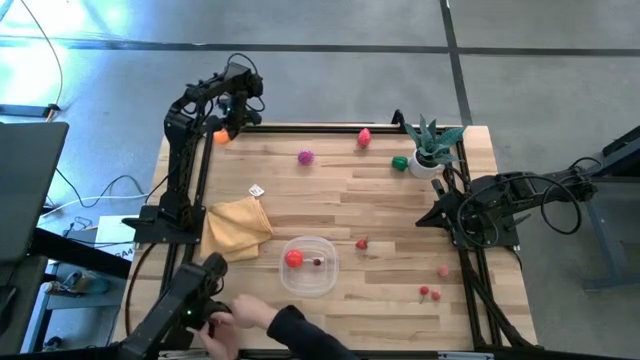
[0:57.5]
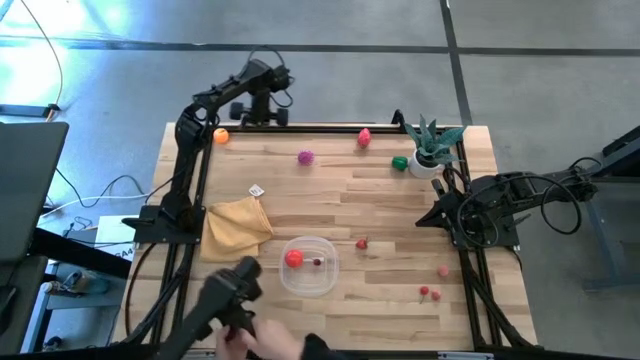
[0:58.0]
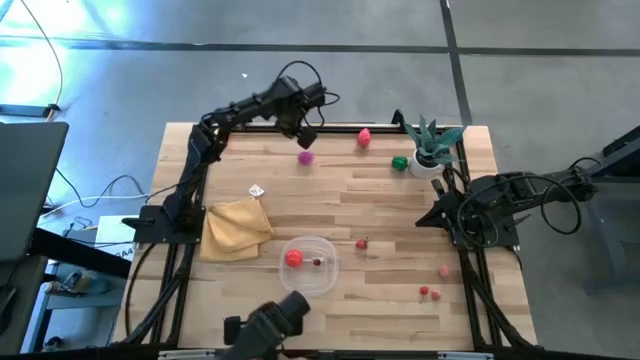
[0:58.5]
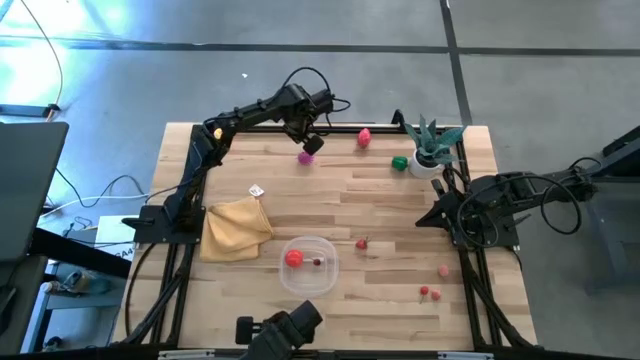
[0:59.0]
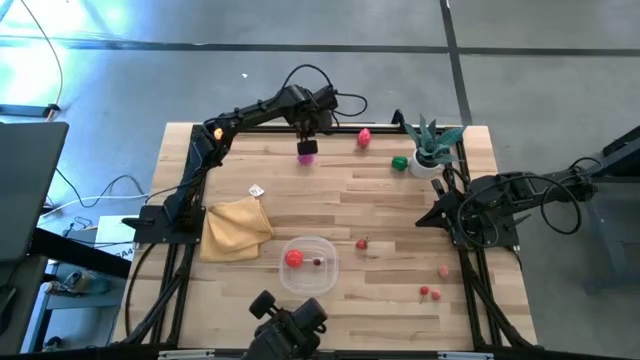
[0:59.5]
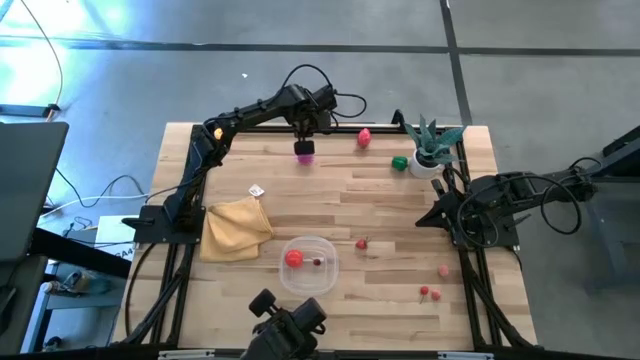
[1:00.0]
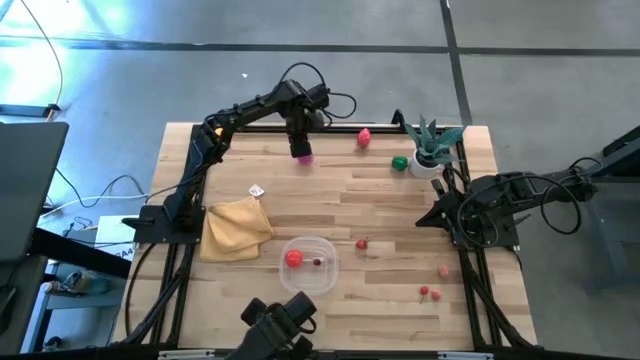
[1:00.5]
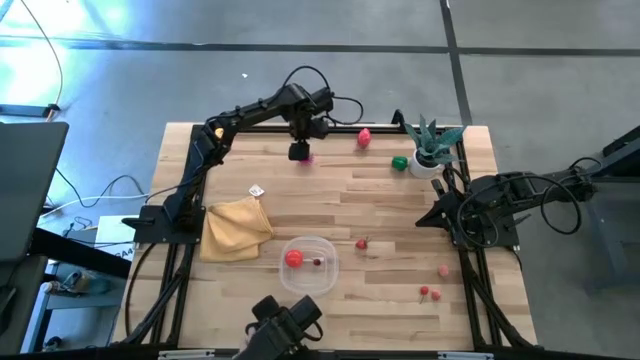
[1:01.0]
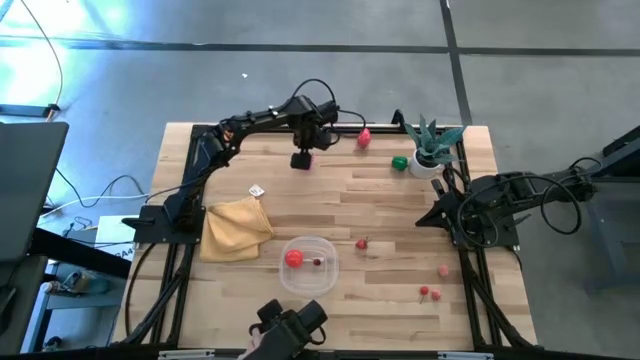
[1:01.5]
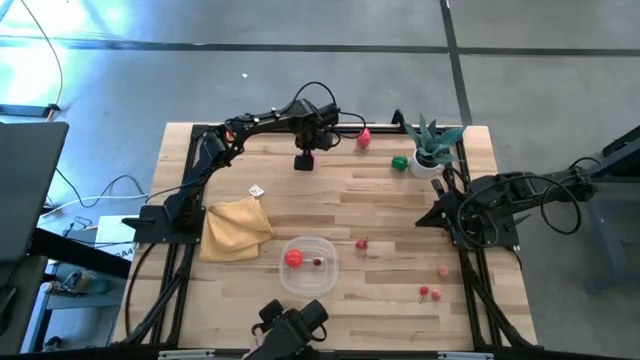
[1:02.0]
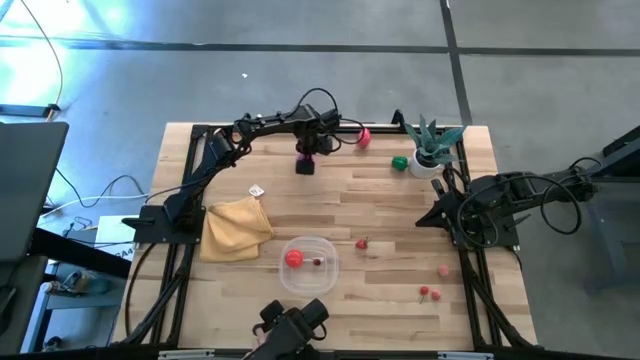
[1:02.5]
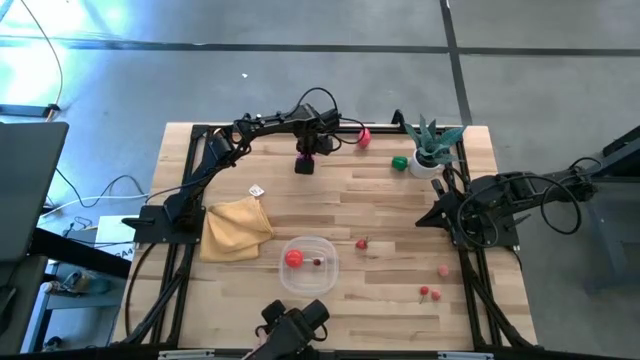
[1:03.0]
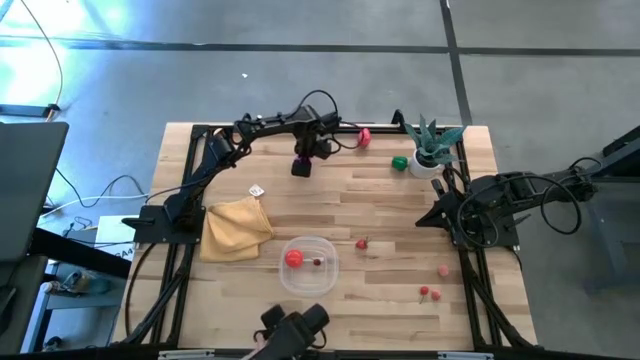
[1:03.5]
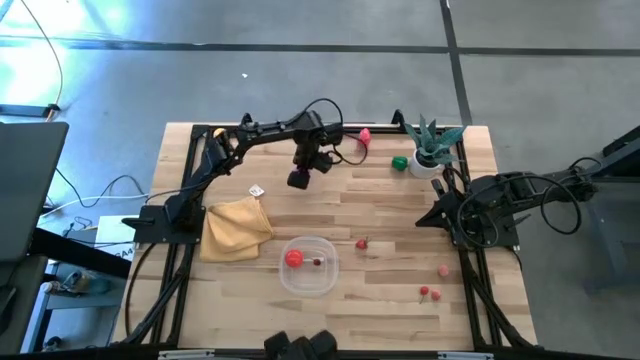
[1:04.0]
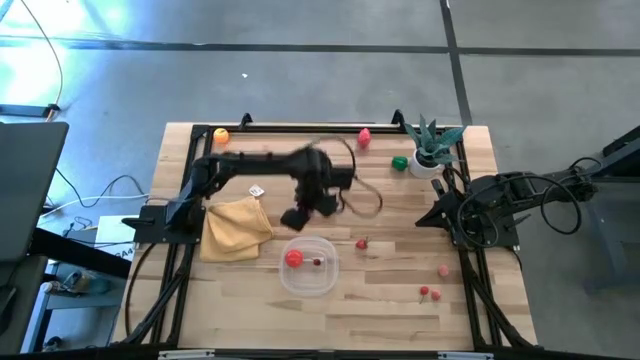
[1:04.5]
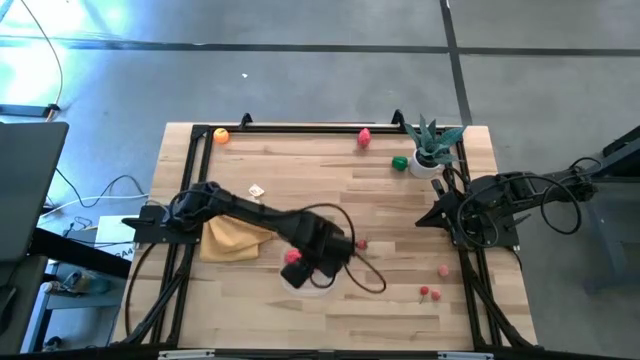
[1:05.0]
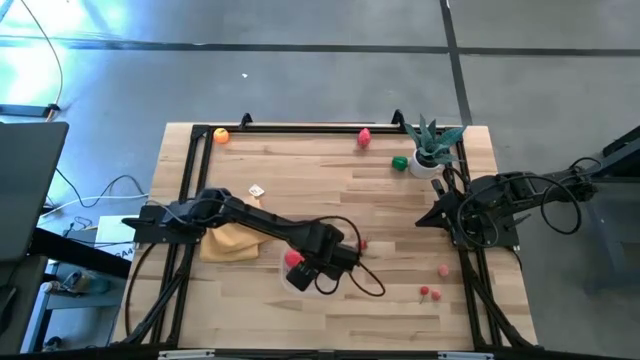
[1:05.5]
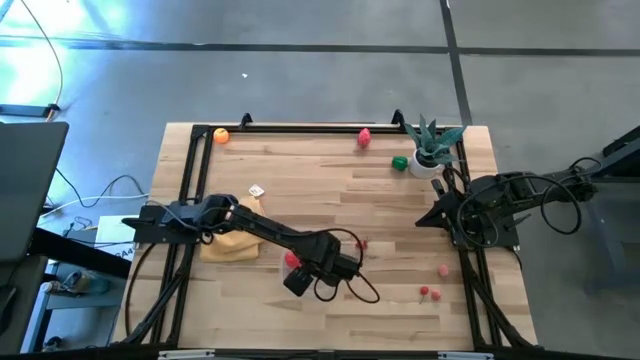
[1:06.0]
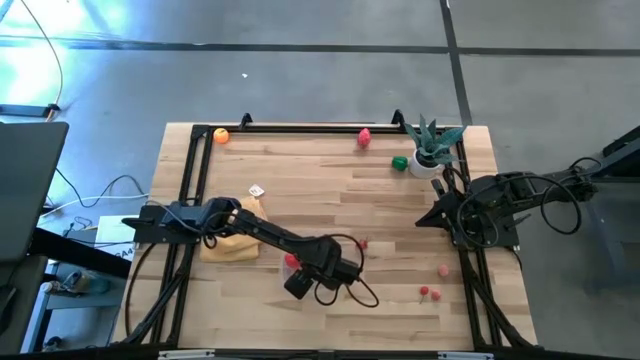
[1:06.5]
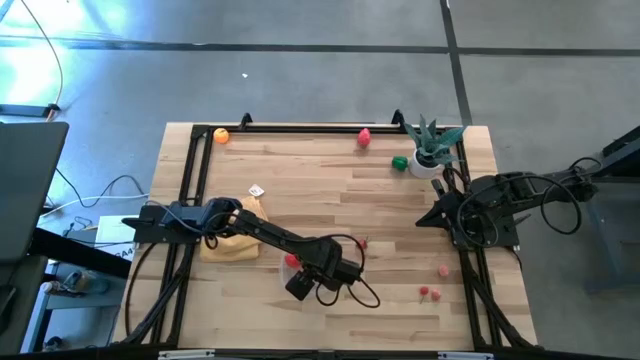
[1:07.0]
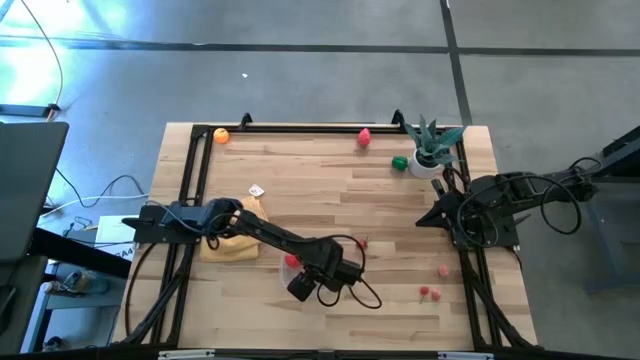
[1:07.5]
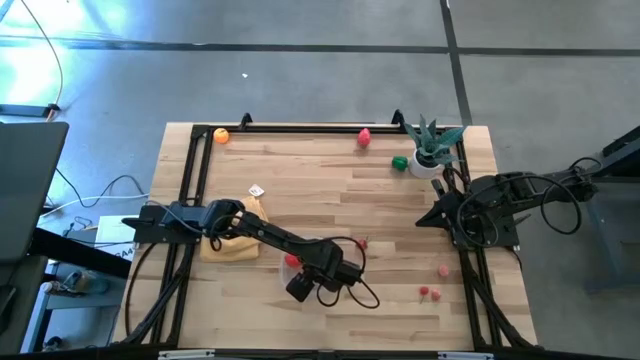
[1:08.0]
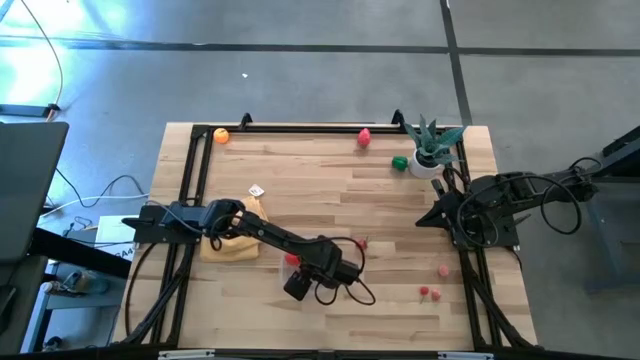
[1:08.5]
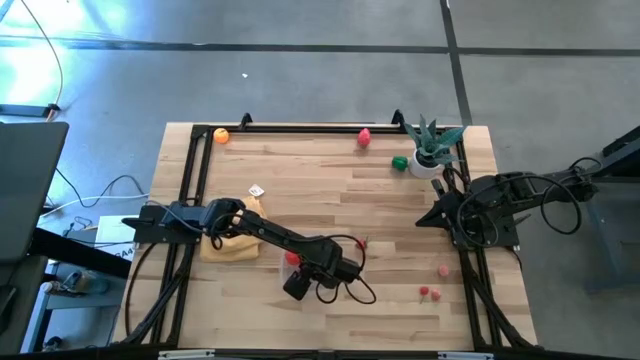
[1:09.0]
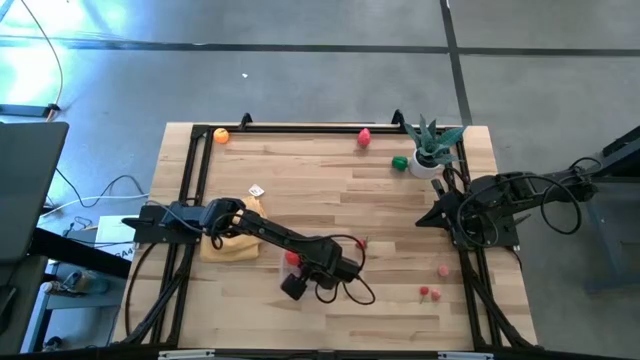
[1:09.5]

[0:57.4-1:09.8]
Task: Pick and placing Produce into tupperware
Put the red onion into the transparent bin

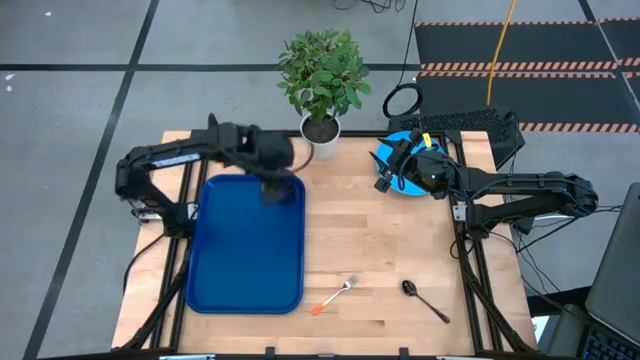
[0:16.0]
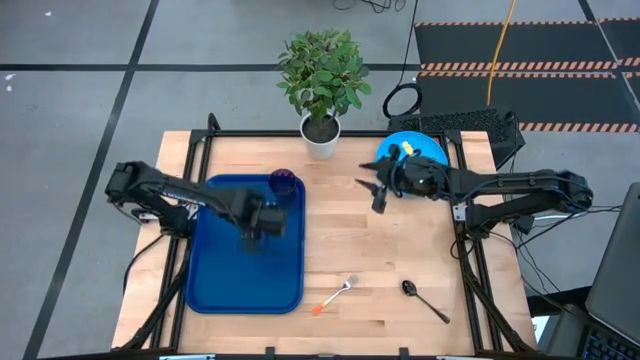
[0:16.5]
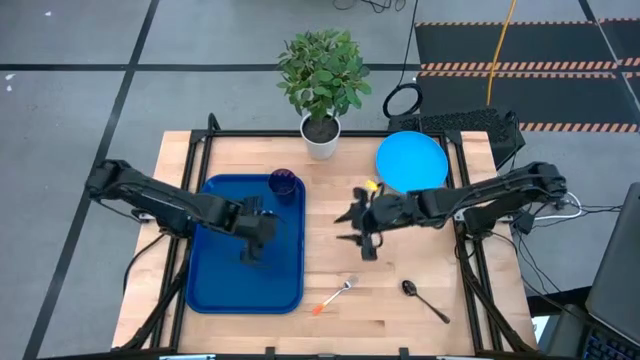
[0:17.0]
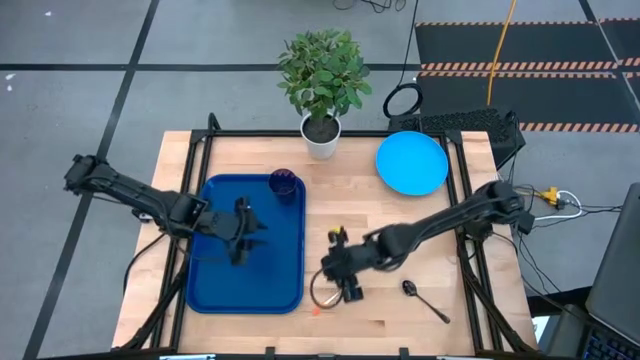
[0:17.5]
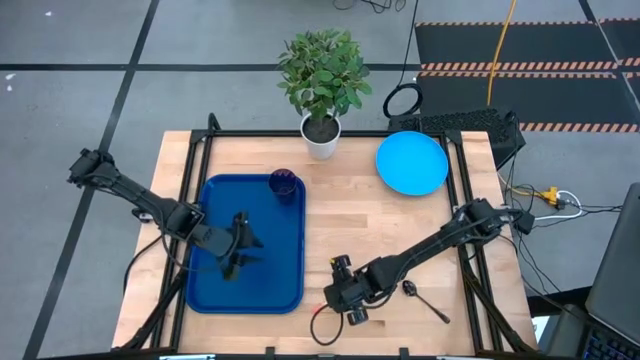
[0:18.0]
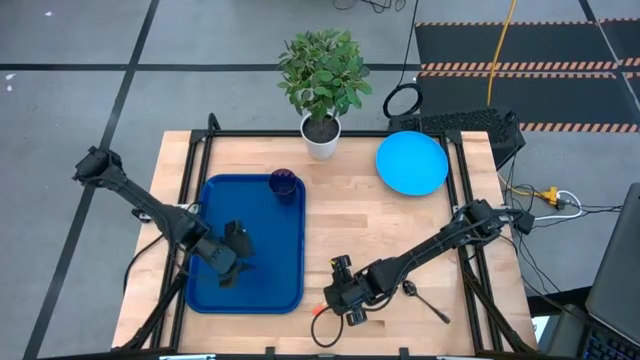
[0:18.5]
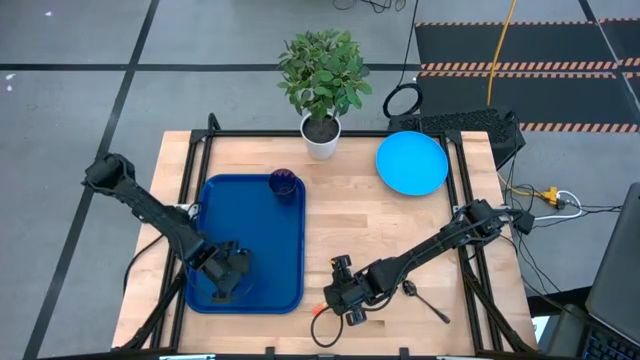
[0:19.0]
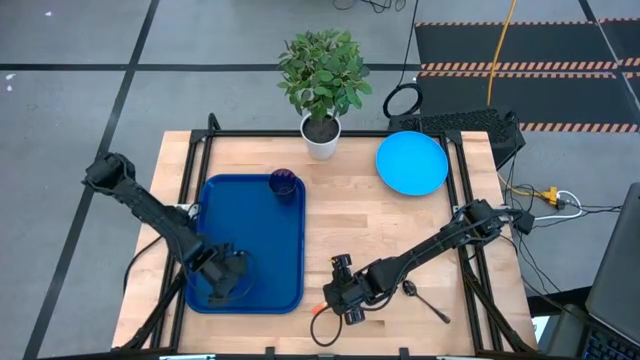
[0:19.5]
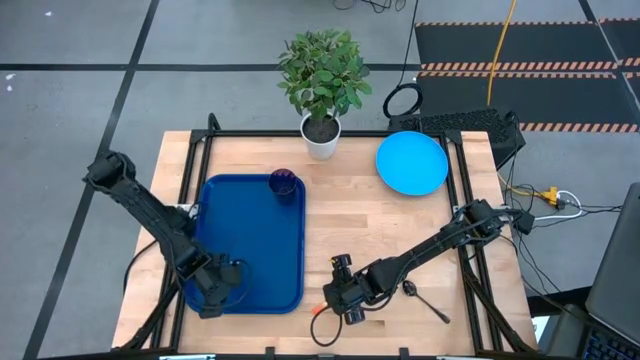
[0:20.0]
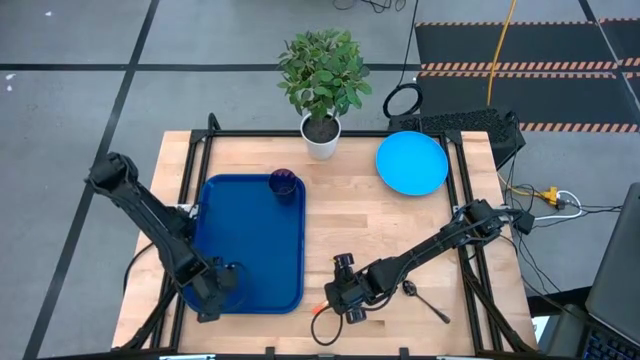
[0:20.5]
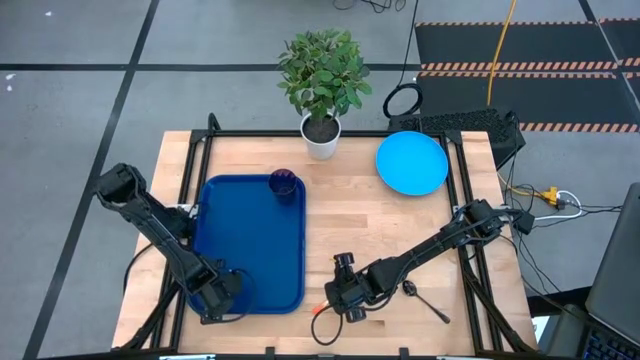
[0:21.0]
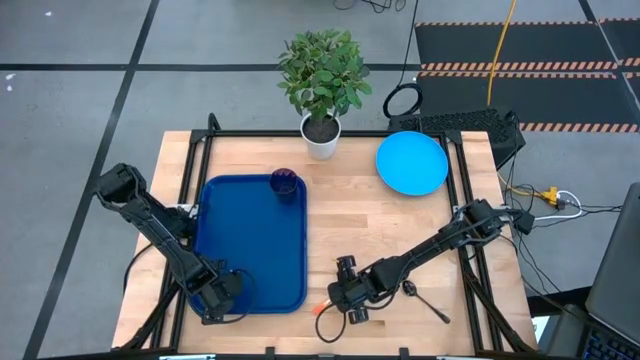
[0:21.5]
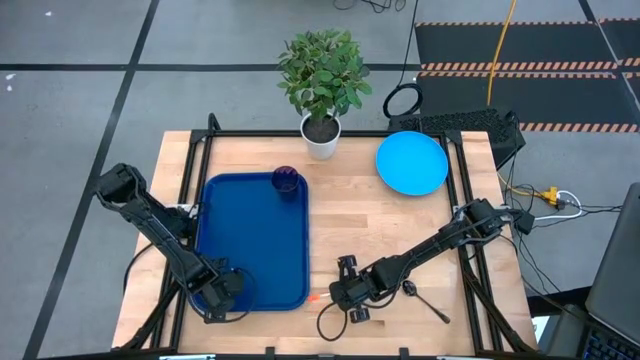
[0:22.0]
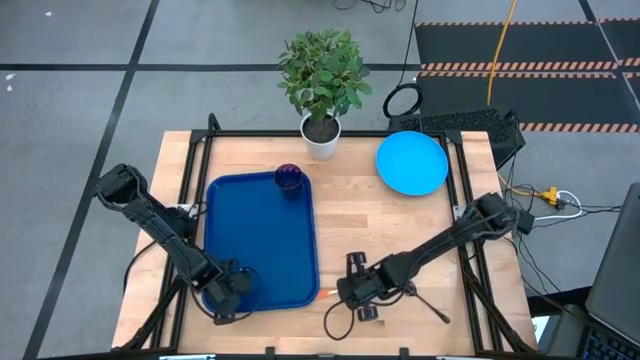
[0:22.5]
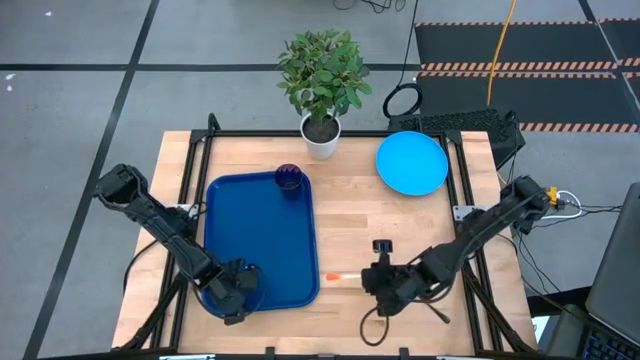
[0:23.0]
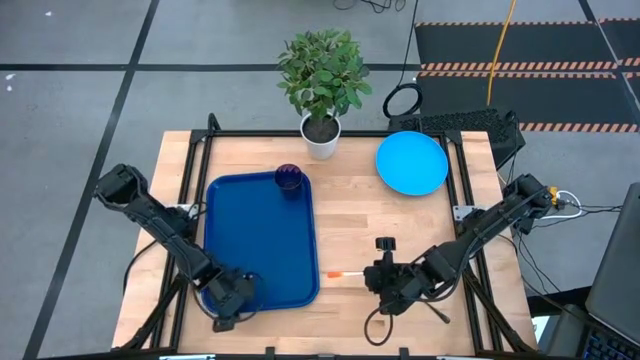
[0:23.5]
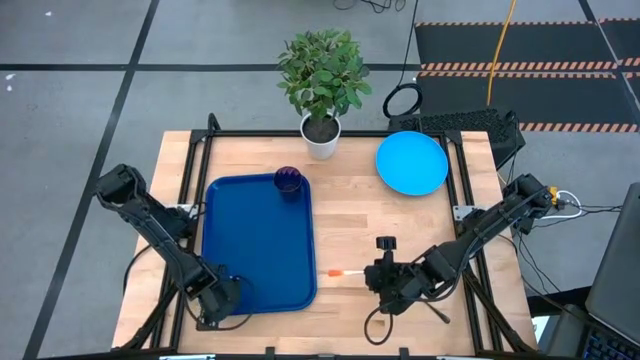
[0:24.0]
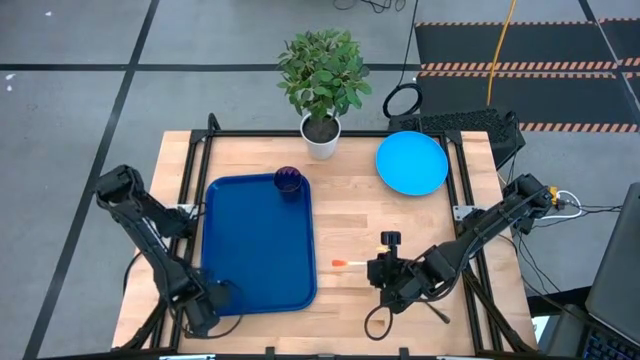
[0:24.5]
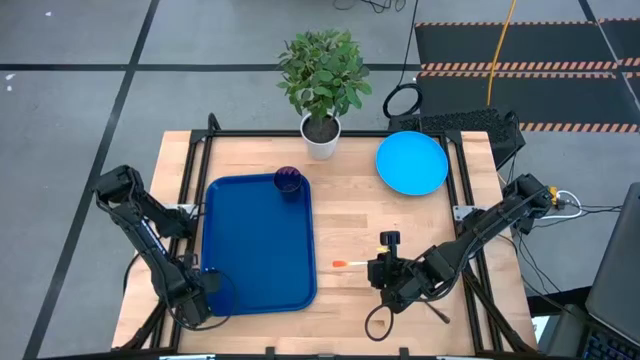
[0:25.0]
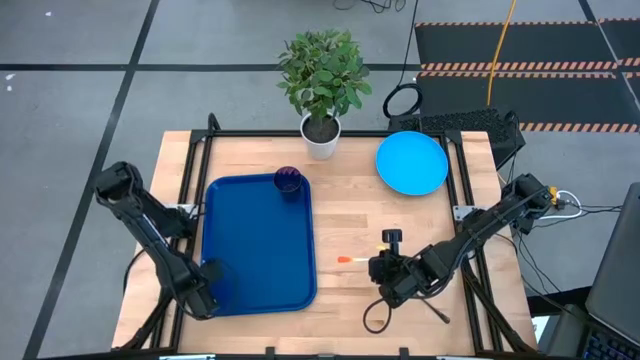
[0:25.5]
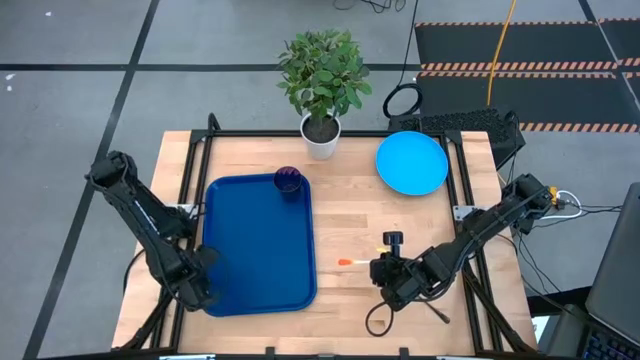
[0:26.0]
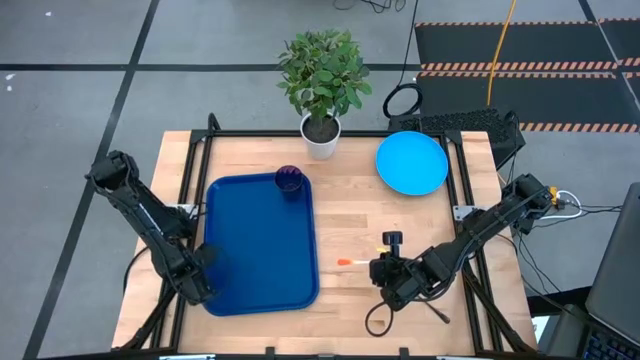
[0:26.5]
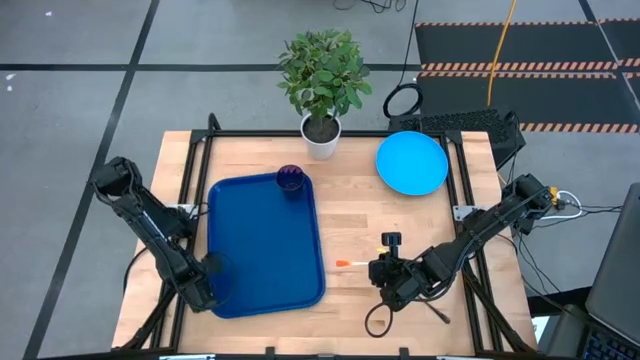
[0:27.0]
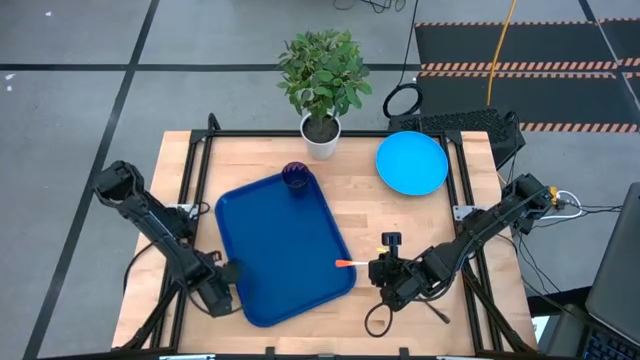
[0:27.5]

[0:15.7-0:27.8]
Task: Pick and place plate/cup/fork/spoon on tray
Put the orange fork on the blue tray
